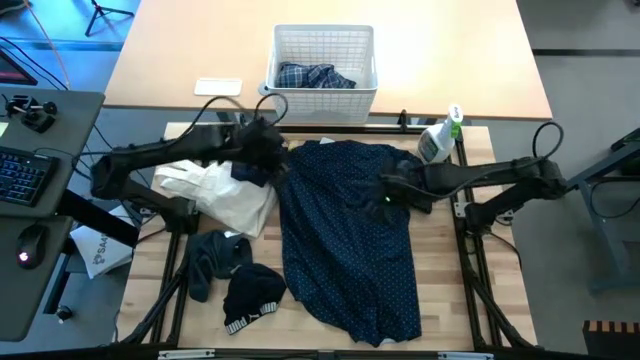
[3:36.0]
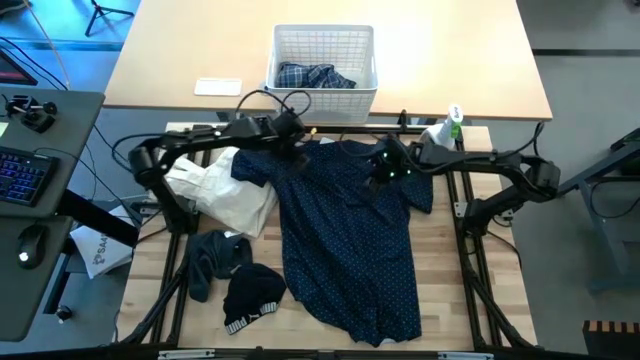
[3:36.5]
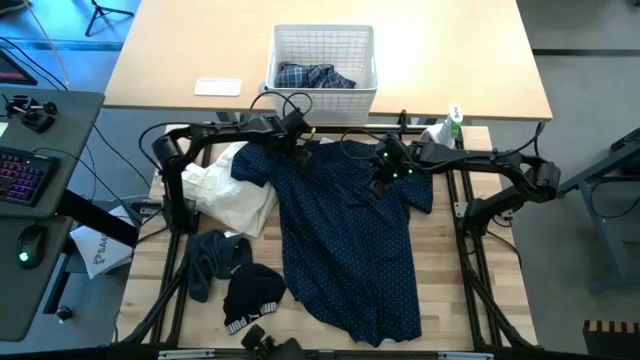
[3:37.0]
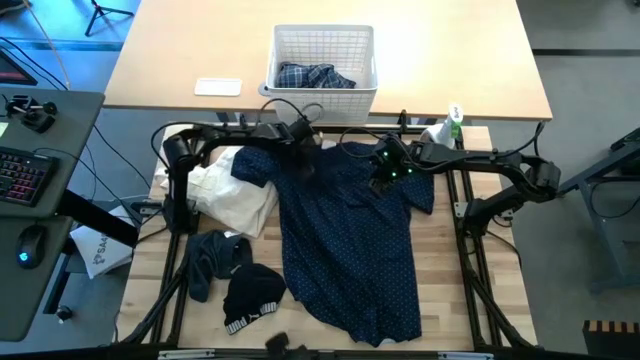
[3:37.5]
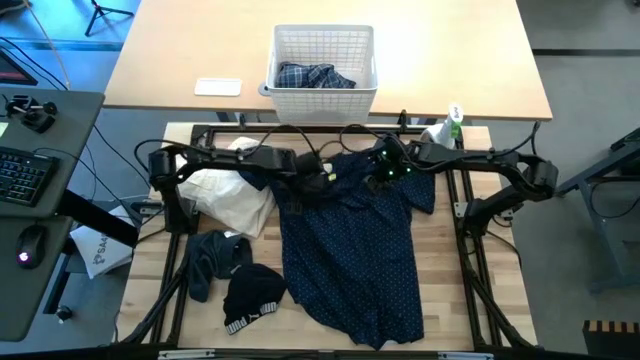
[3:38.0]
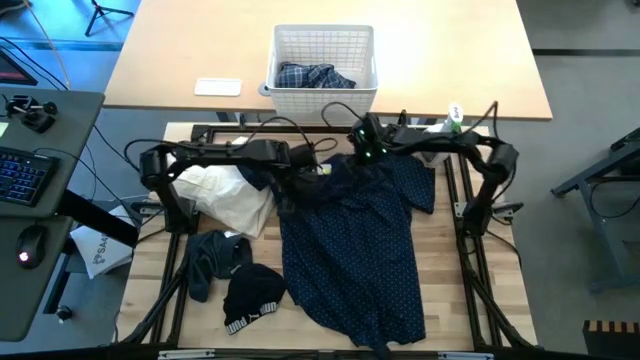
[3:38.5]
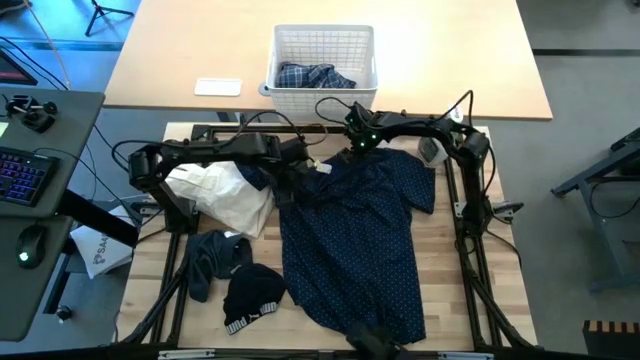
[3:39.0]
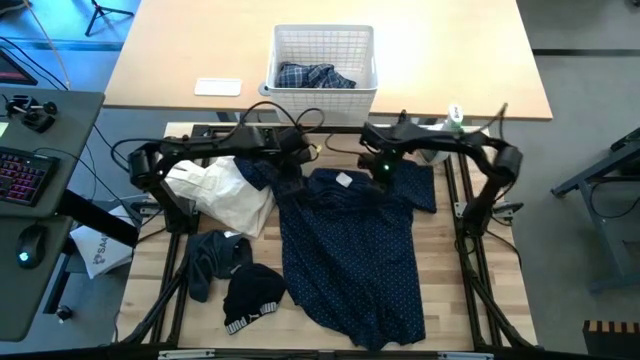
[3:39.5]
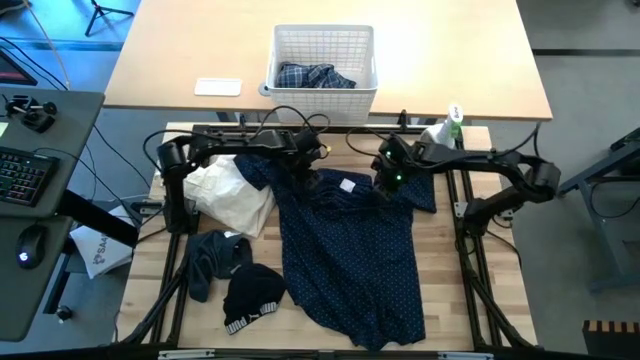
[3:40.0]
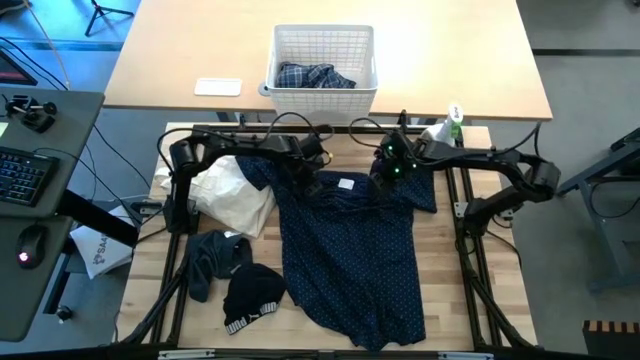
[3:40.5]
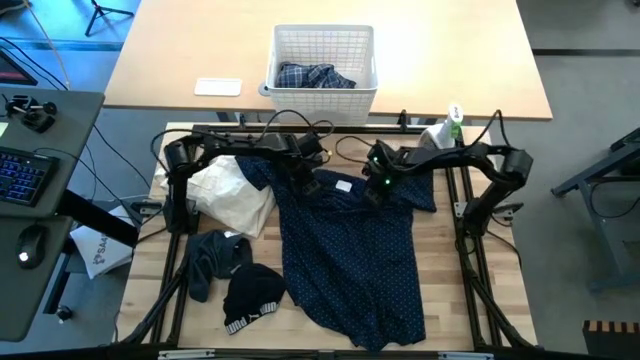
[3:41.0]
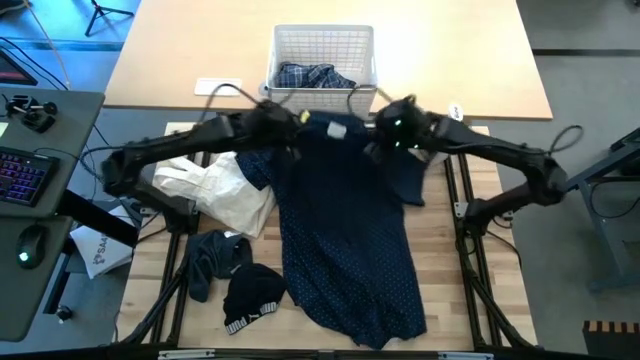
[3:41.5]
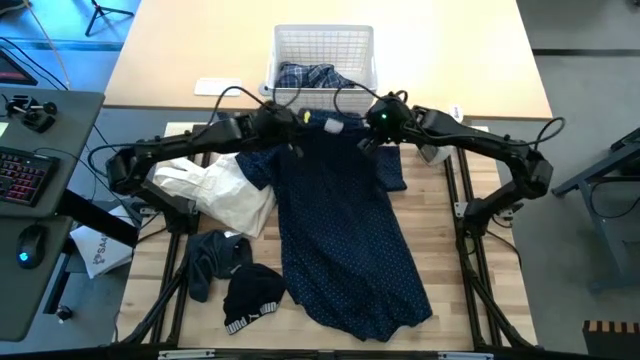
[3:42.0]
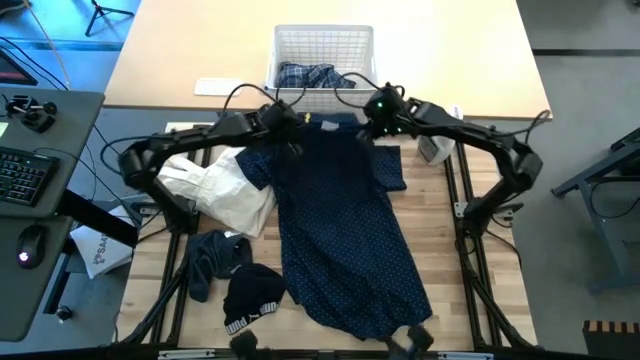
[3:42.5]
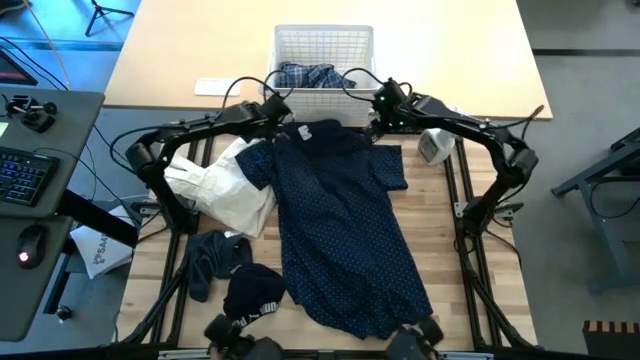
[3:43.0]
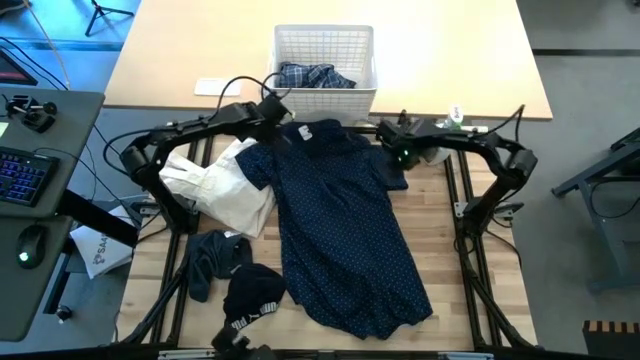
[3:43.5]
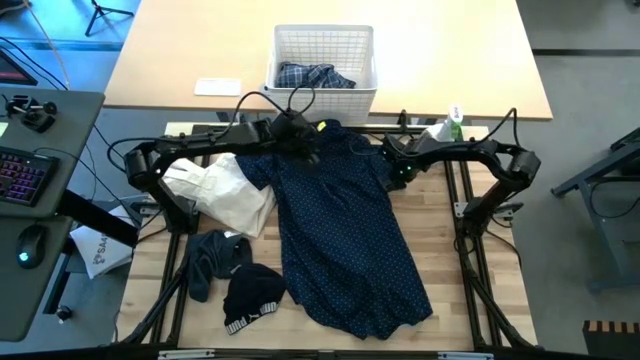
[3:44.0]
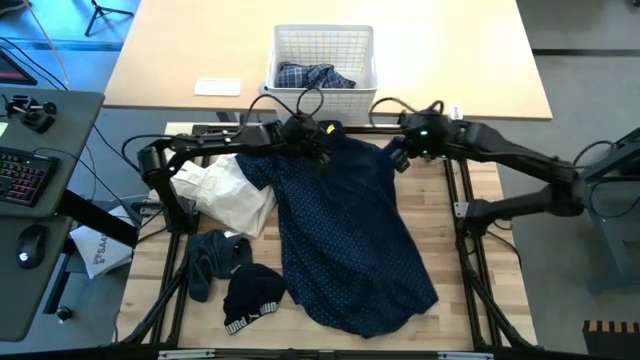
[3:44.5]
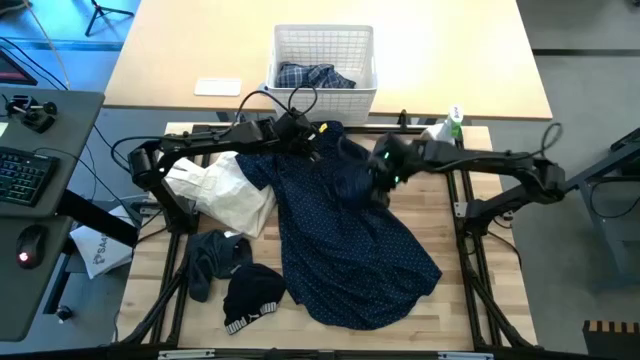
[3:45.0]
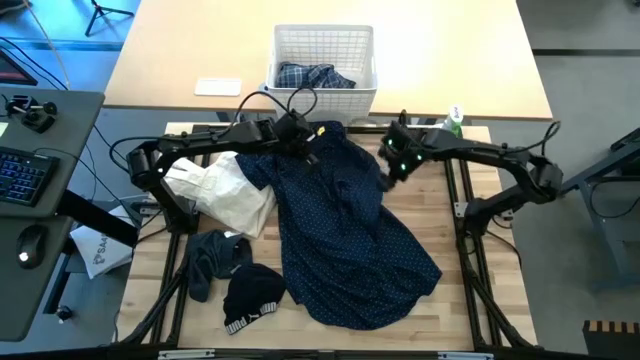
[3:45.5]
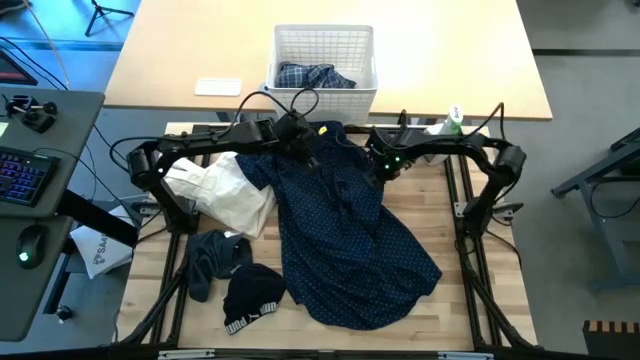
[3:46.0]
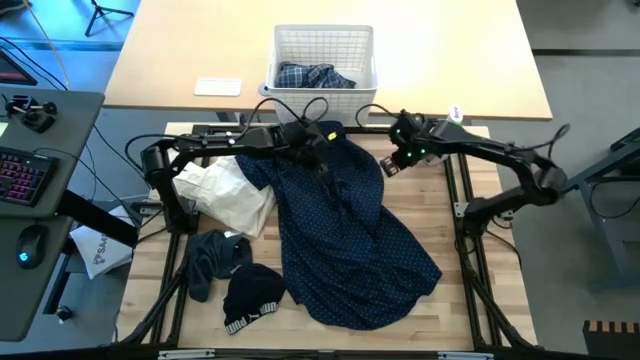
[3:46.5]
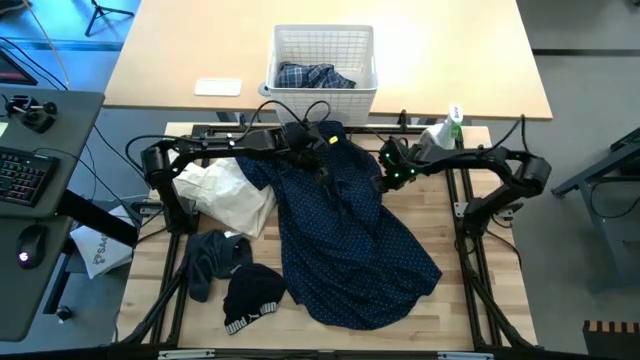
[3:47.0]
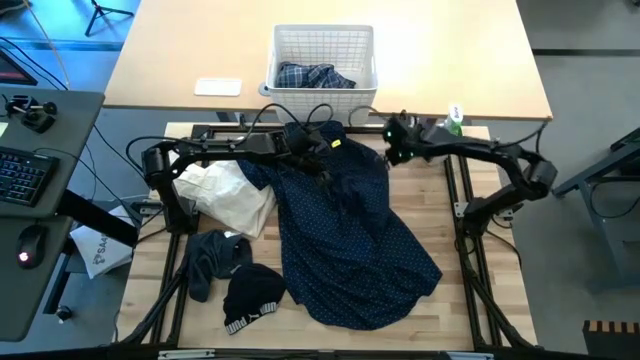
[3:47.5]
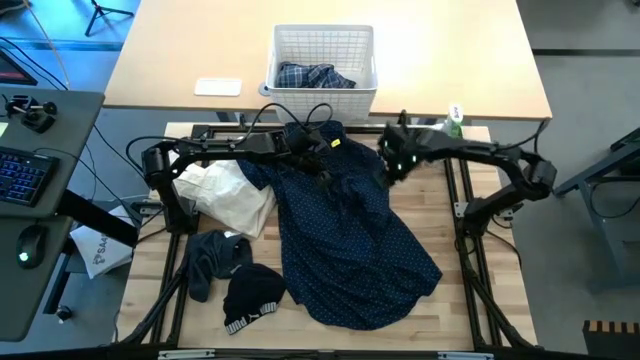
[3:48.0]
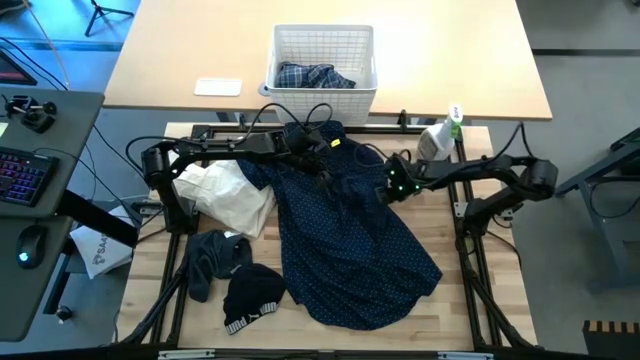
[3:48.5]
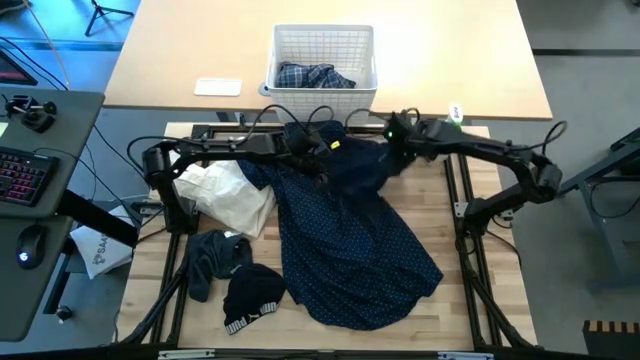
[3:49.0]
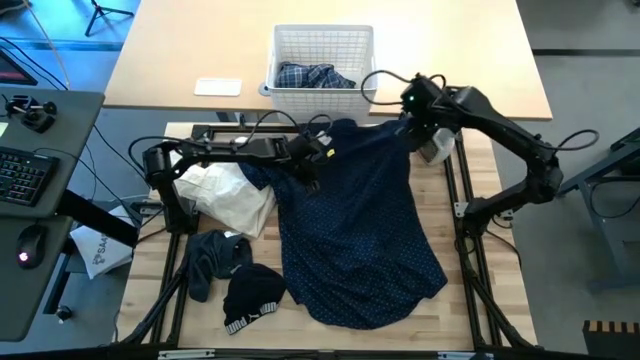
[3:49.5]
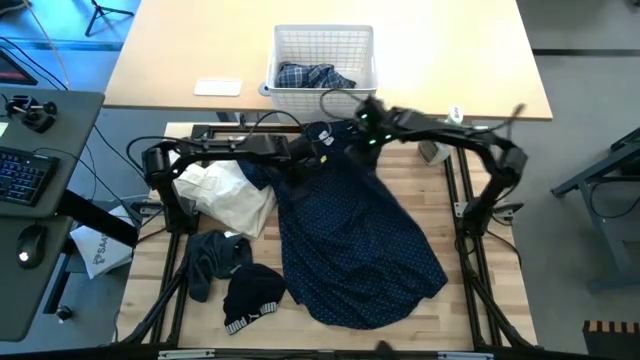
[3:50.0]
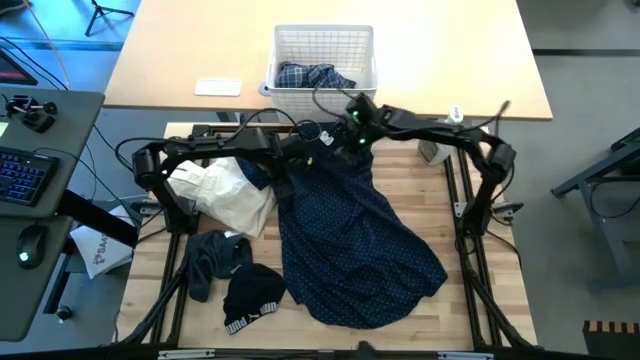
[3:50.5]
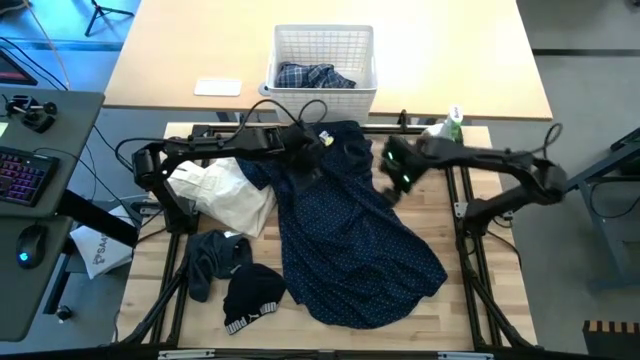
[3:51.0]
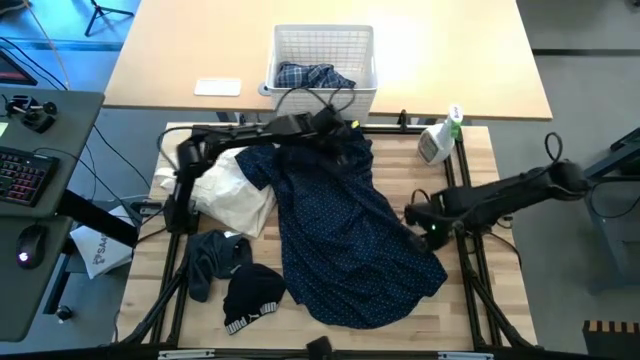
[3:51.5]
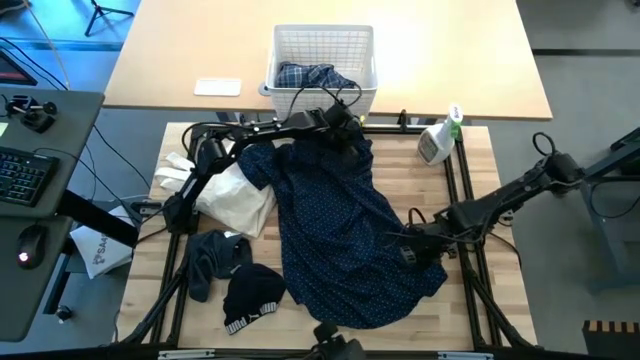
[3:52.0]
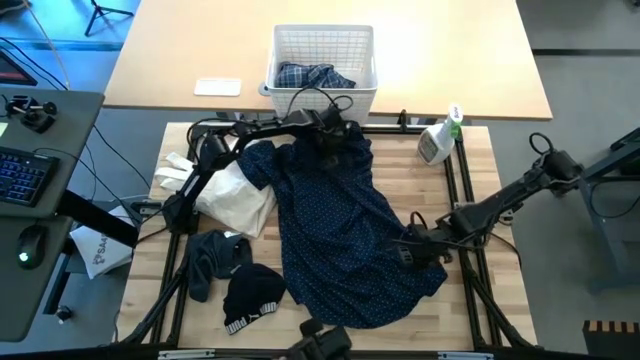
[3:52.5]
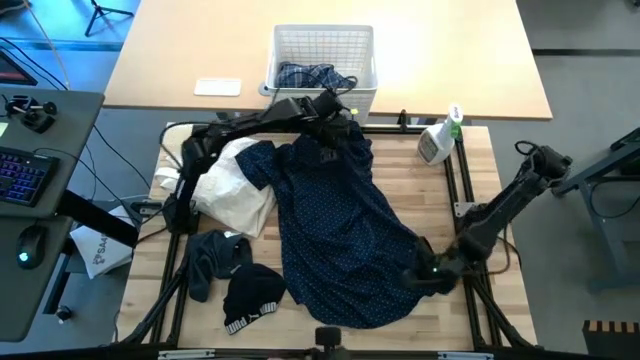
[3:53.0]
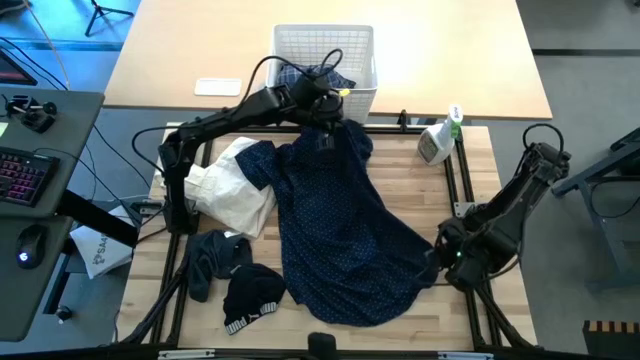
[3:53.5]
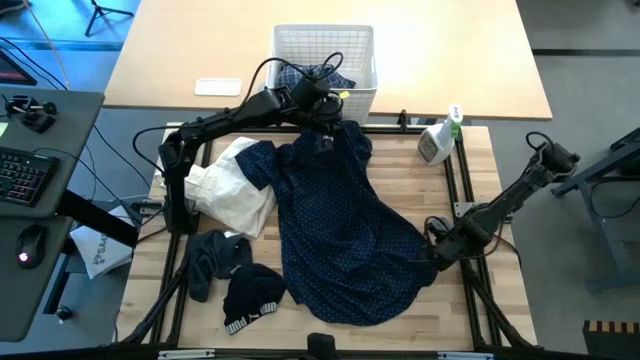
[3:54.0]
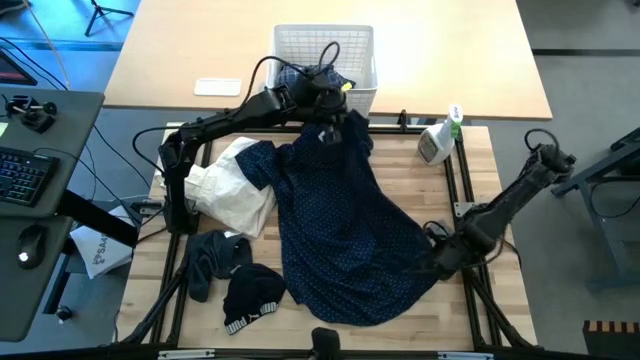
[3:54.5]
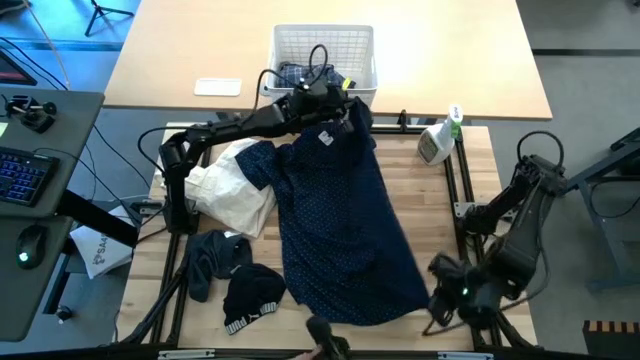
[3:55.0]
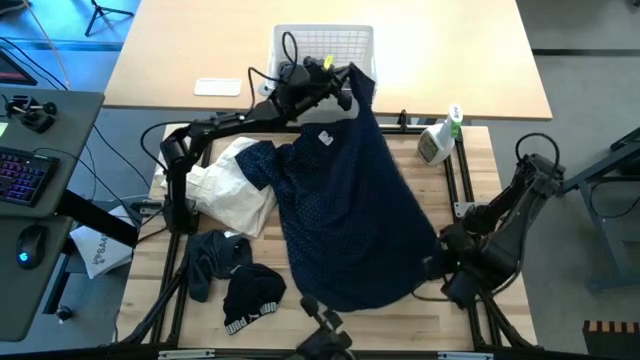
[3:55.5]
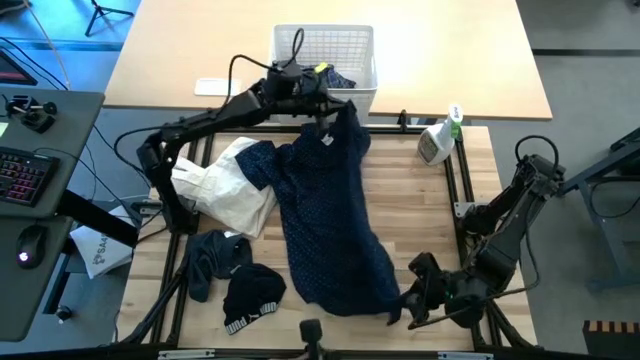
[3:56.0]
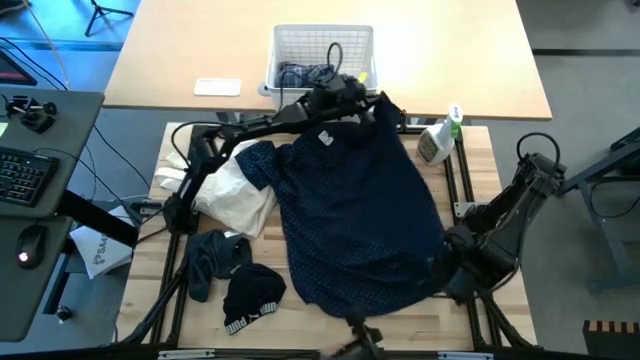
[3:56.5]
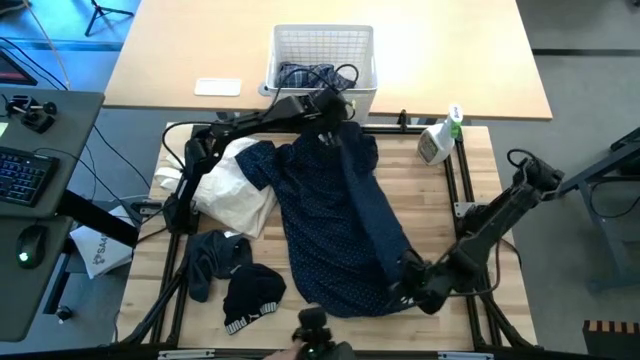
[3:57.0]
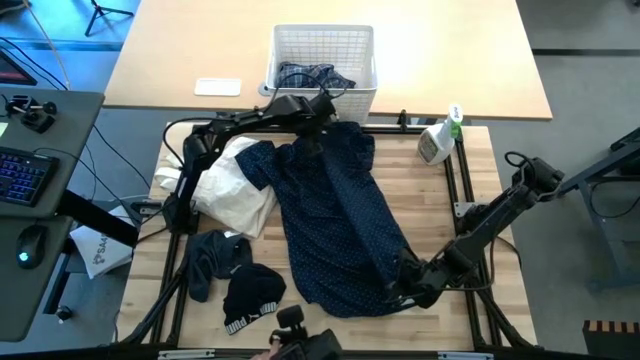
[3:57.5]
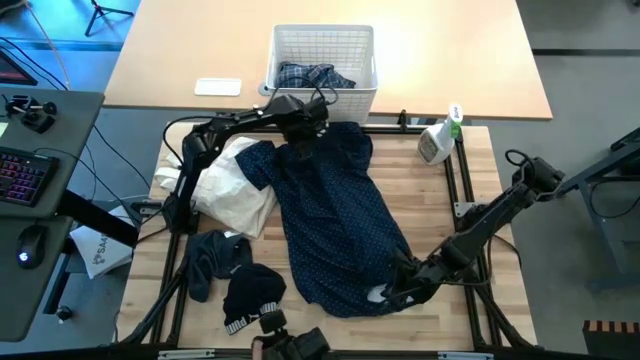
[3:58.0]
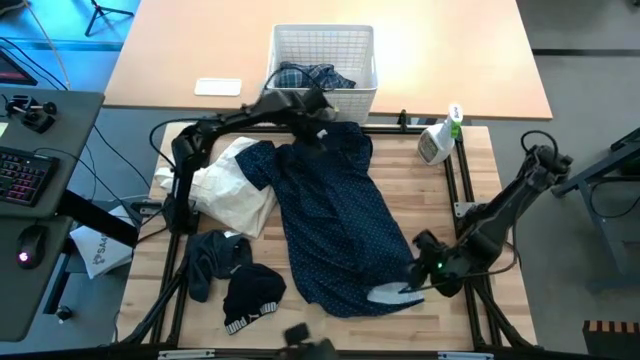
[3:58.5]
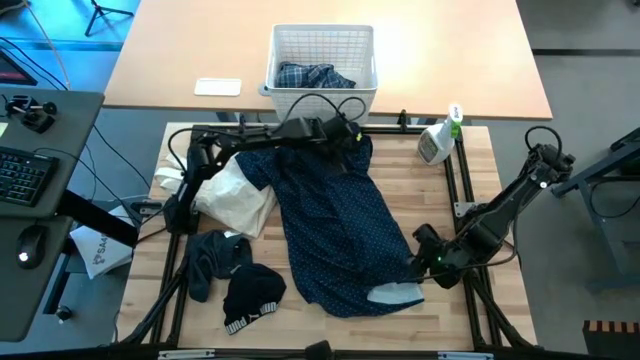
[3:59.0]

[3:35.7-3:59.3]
Task: Fold laundry
Fold the navy blue polo shirt
